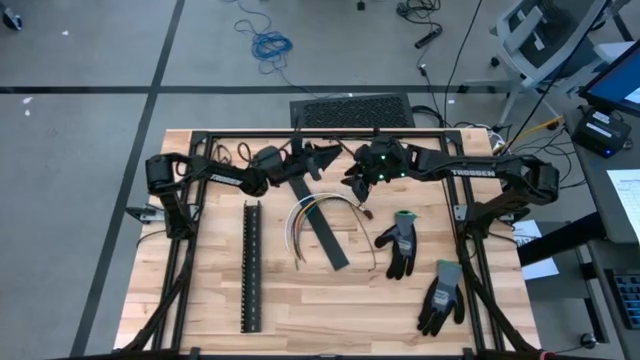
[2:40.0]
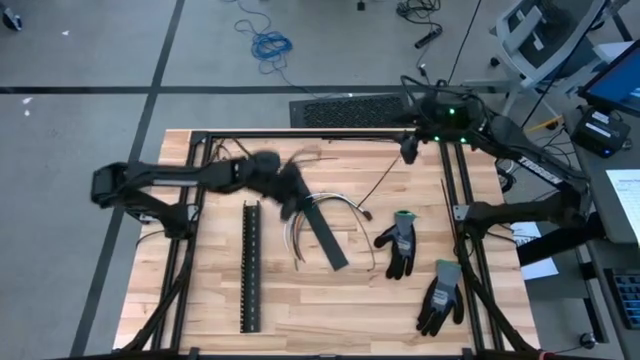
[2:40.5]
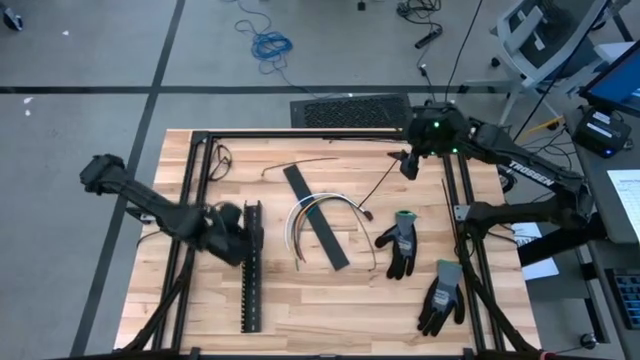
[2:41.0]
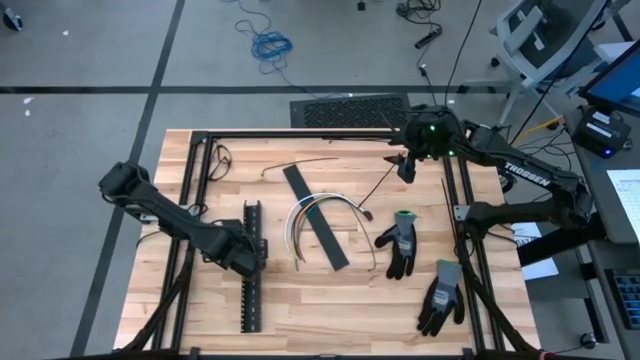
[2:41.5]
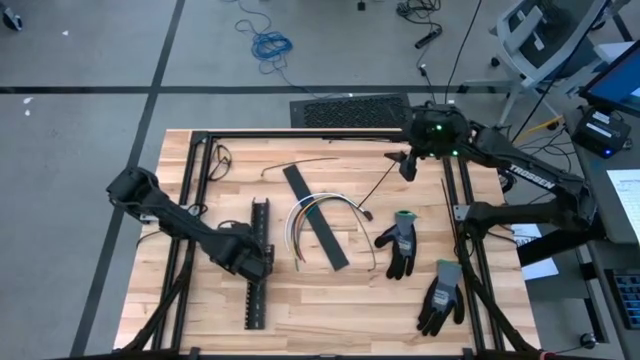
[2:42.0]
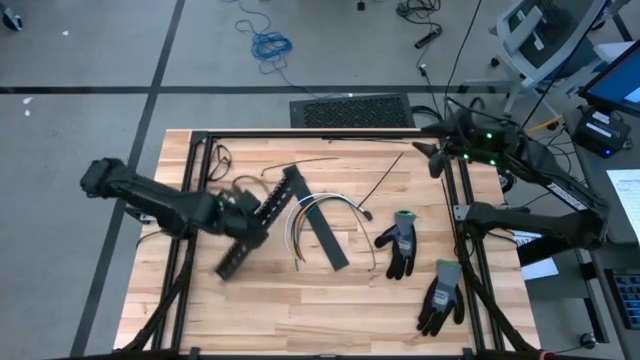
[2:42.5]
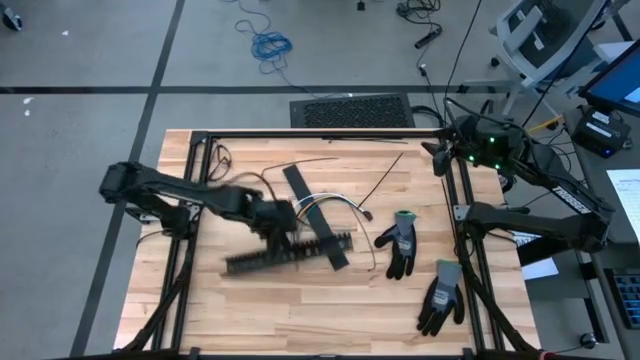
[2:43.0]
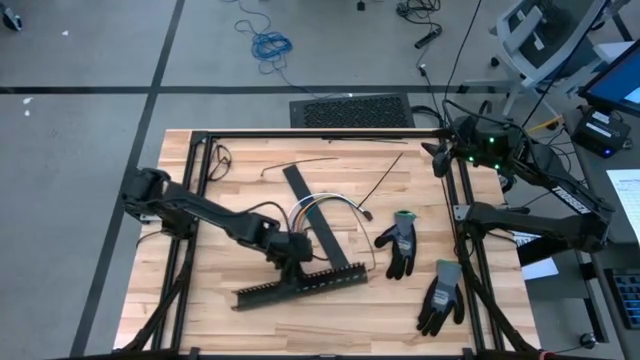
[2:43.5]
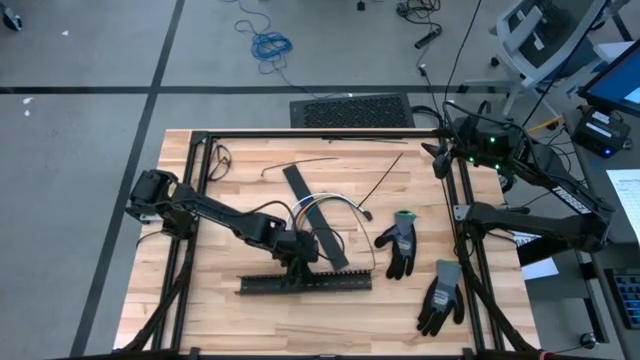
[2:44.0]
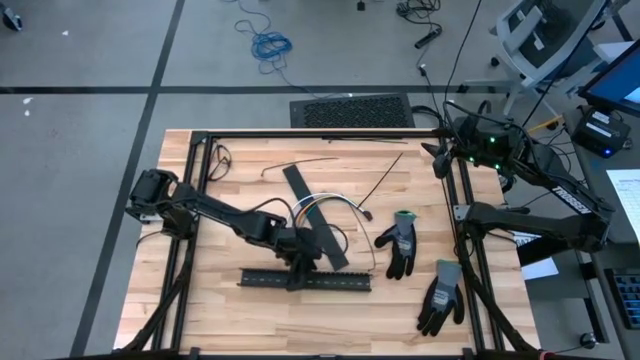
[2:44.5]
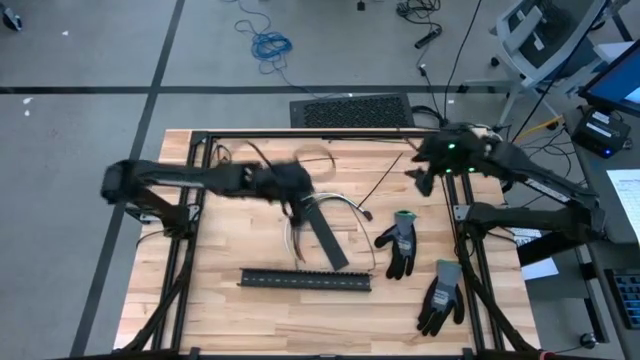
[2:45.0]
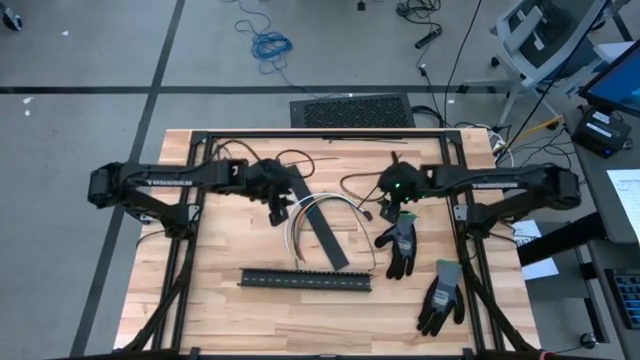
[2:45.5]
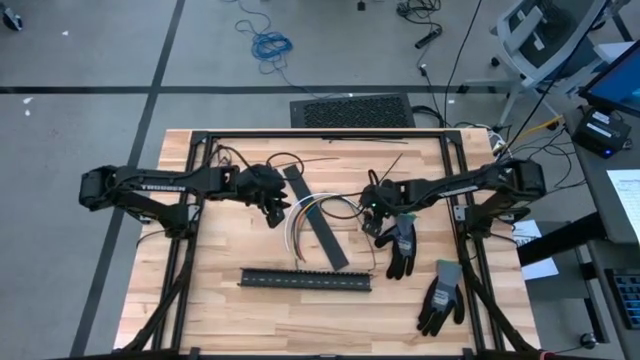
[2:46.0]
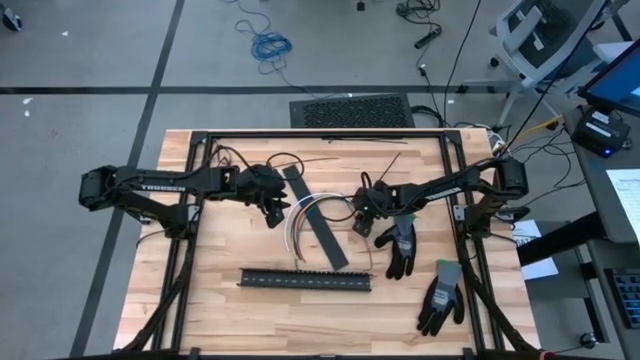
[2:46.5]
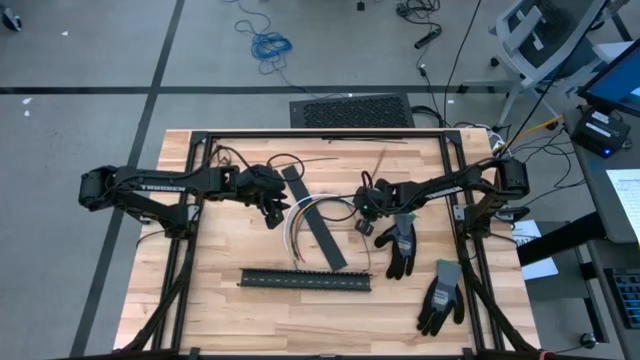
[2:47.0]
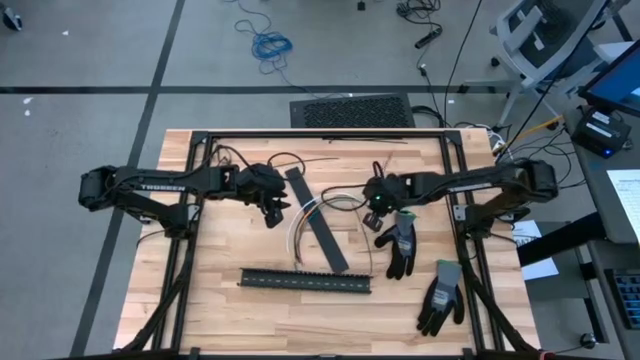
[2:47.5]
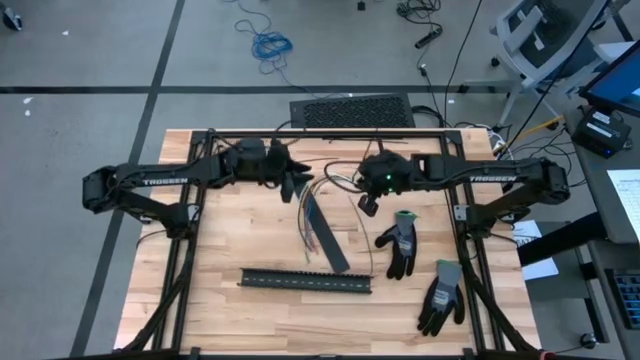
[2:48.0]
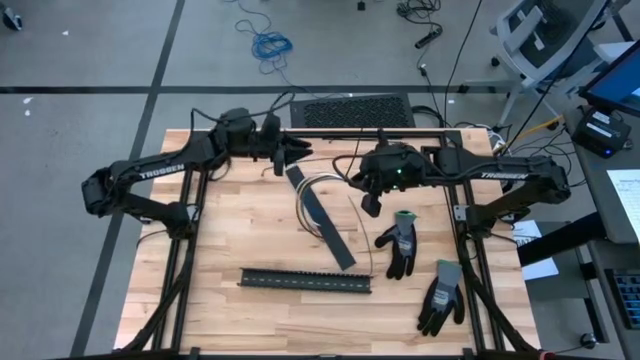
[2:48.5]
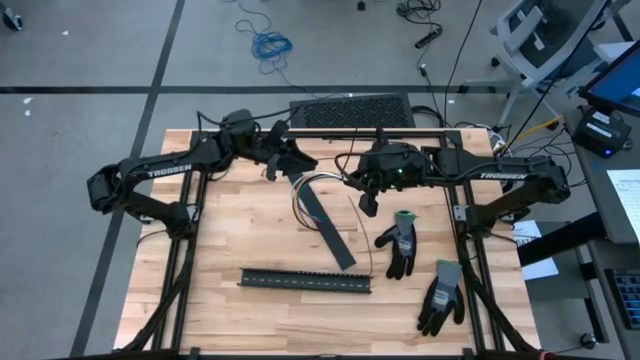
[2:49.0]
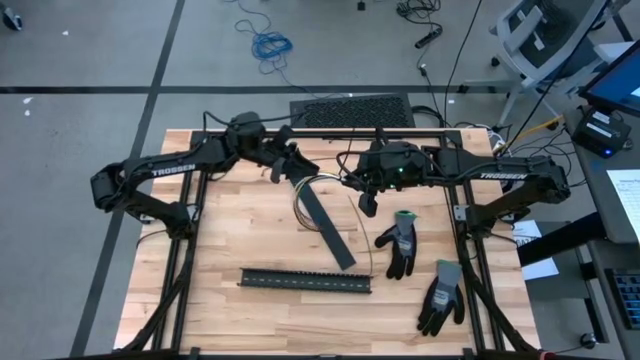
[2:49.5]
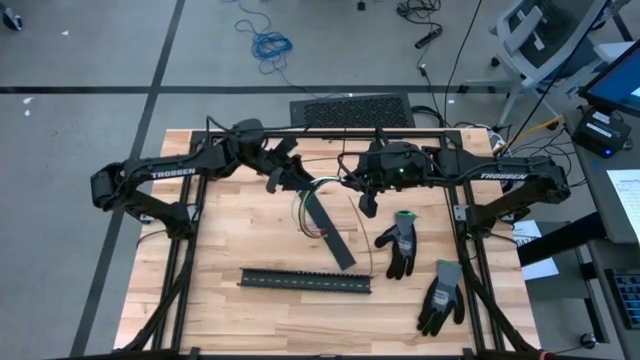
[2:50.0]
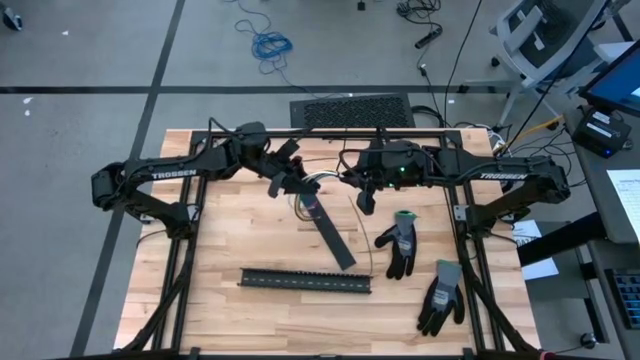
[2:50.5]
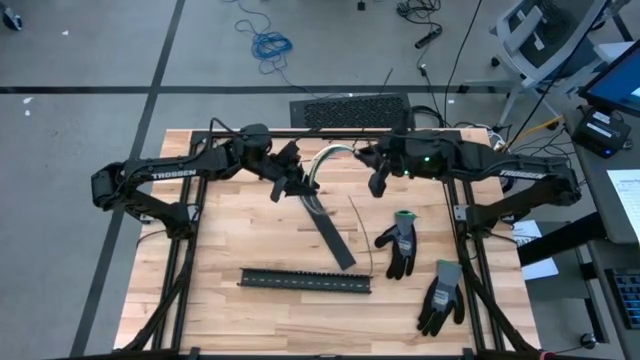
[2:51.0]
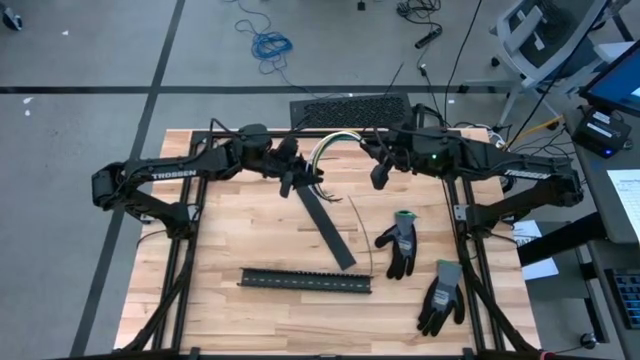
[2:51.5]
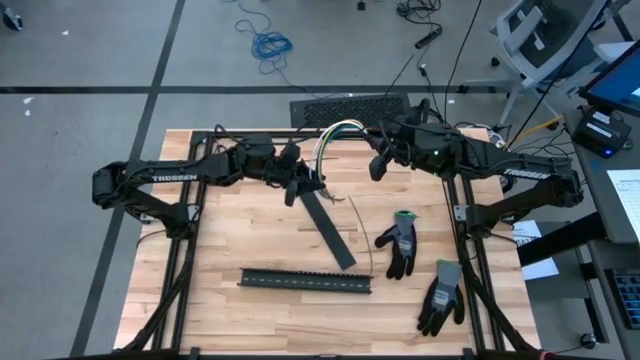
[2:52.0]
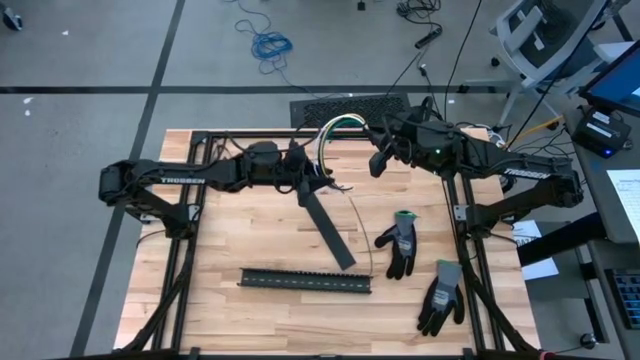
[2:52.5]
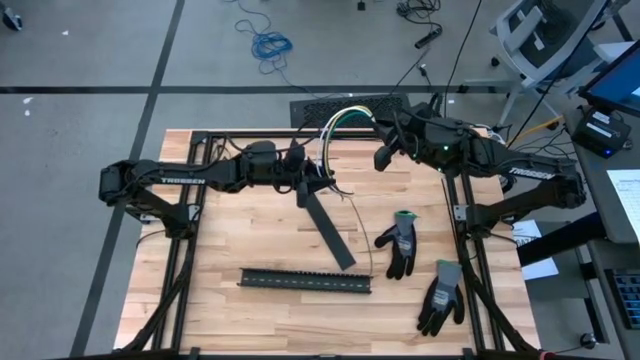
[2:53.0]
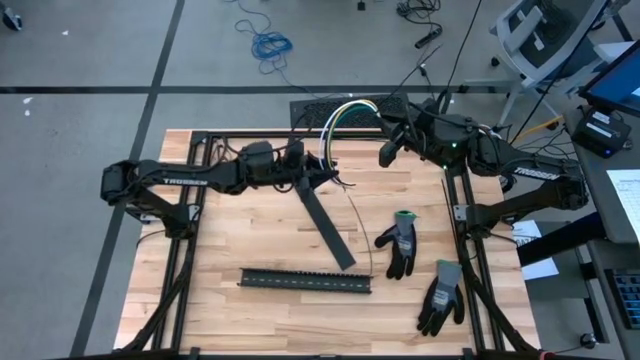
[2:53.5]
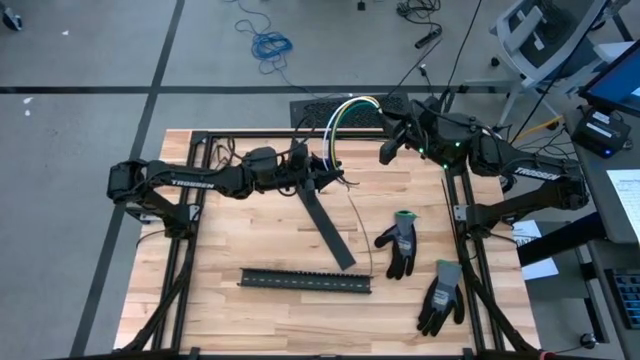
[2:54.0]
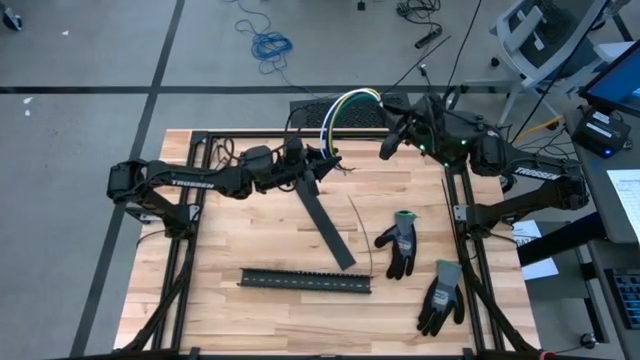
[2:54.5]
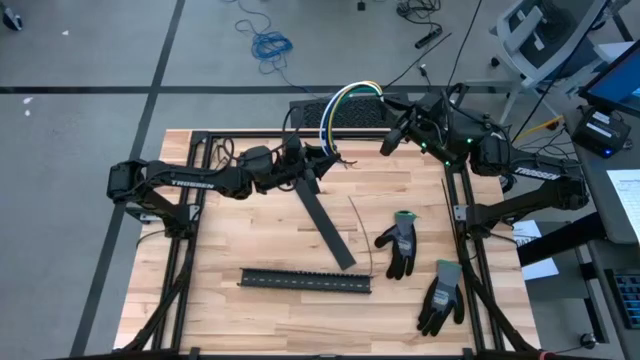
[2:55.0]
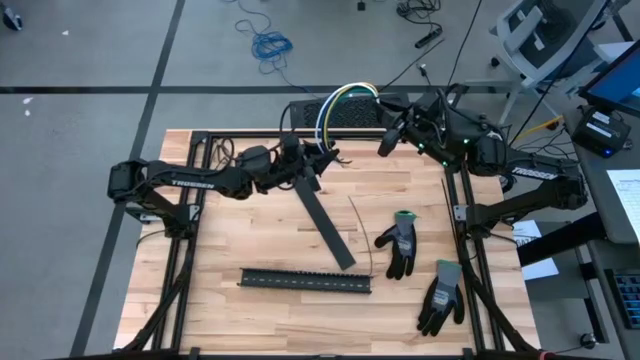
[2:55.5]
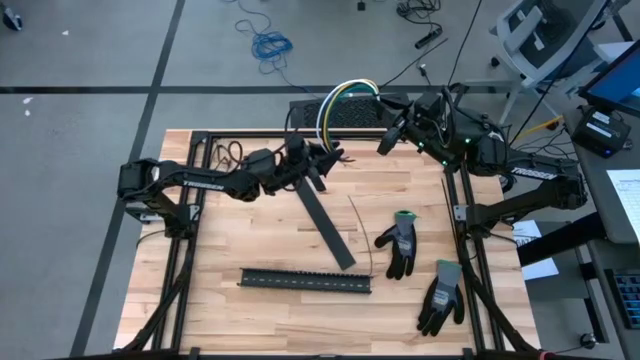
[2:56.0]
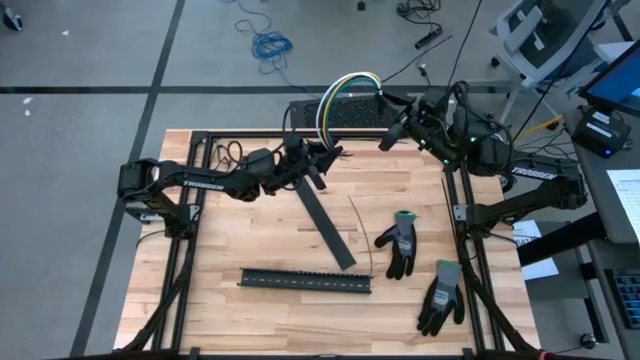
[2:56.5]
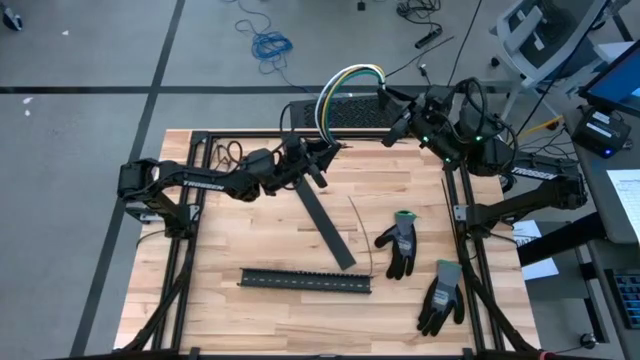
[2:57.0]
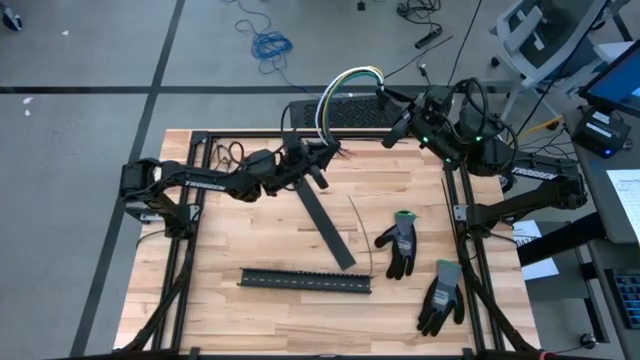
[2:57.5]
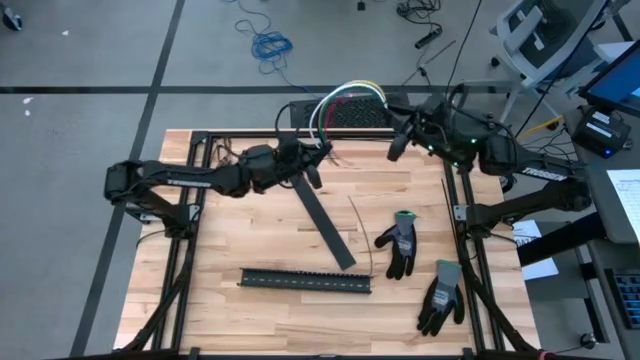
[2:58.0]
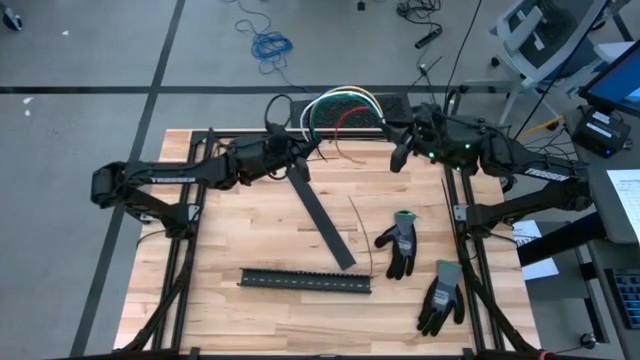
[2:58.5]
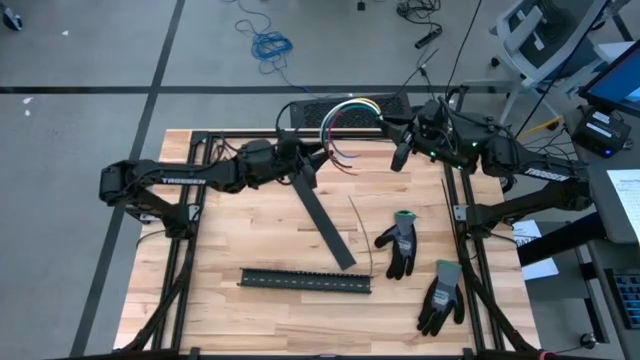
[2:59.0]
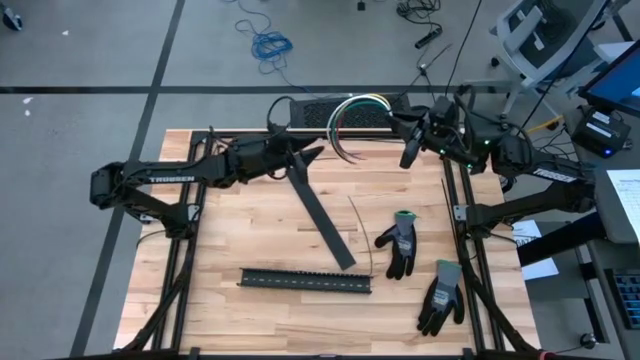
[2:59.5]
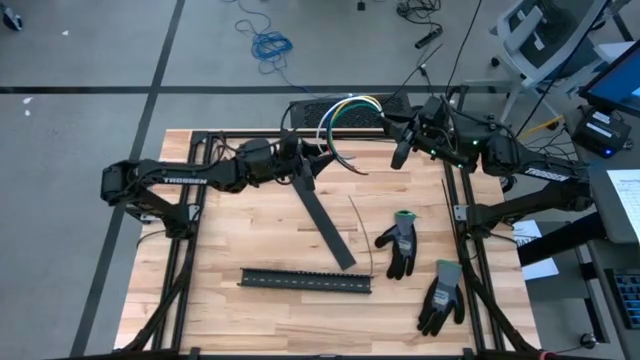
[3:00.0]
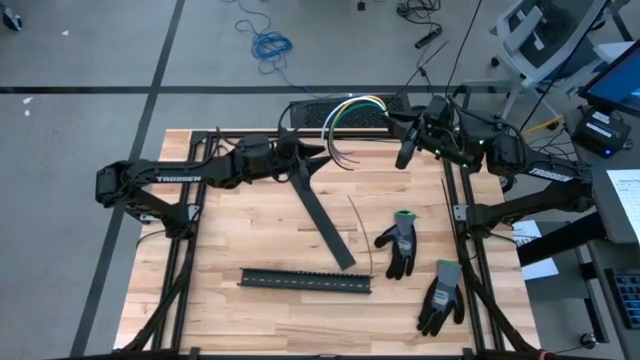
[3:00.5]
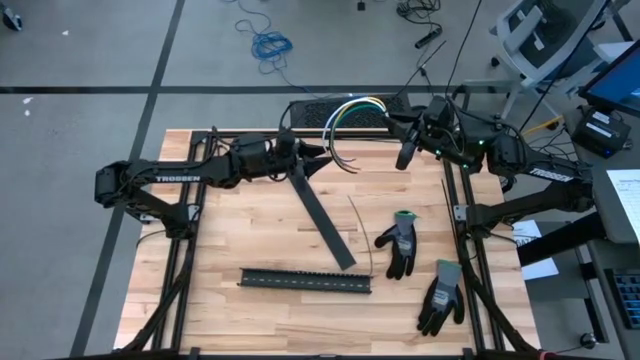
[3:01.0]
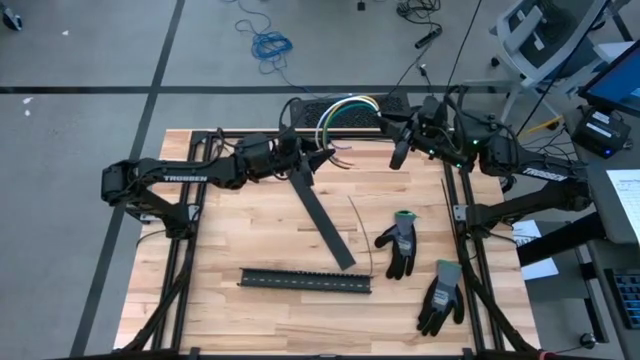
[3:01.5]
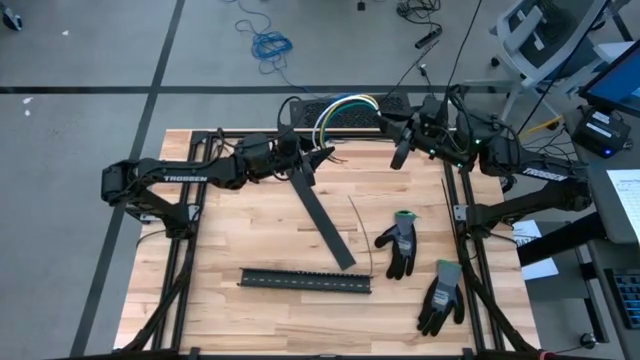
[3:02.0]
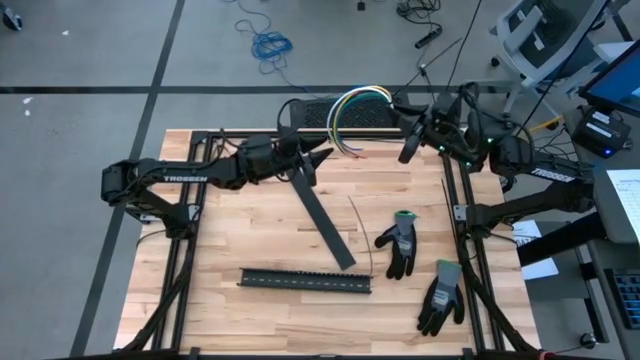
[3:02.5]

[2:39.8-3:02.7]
Task: Ziptie cables
Put the zip-tied cables in the black cable duct
